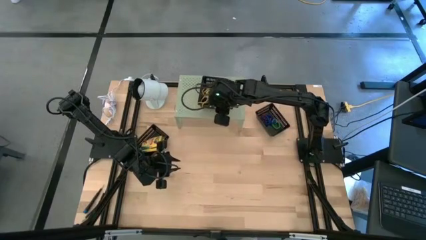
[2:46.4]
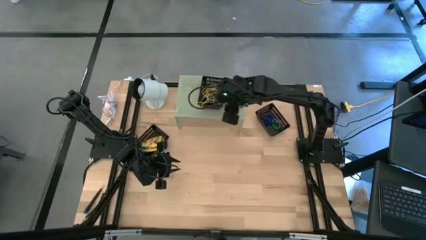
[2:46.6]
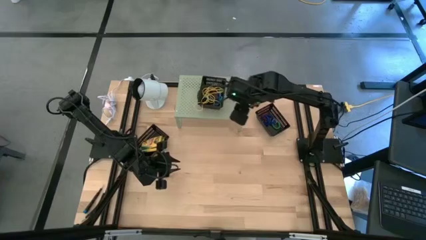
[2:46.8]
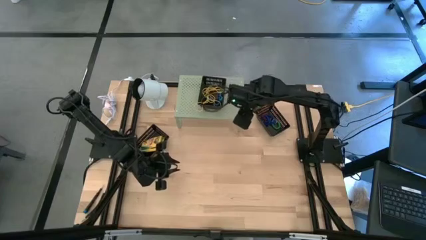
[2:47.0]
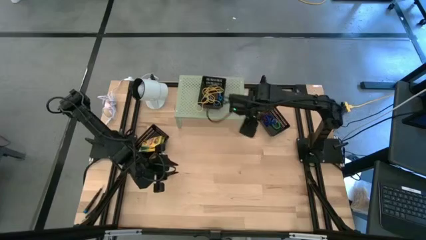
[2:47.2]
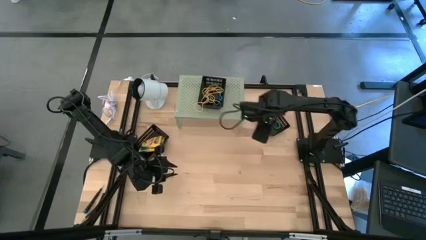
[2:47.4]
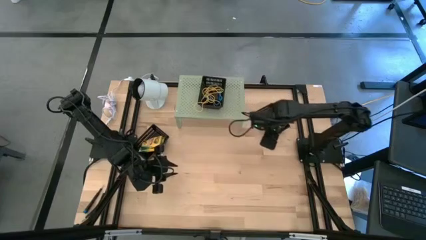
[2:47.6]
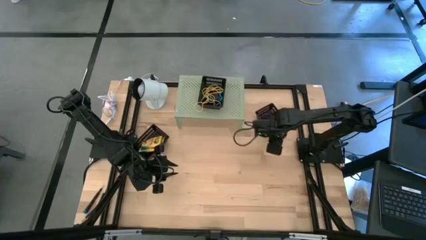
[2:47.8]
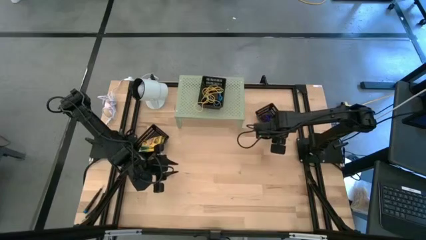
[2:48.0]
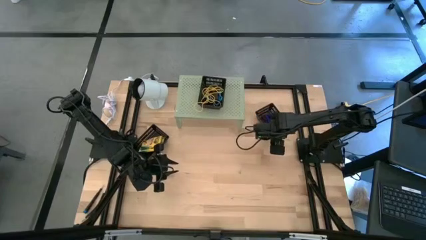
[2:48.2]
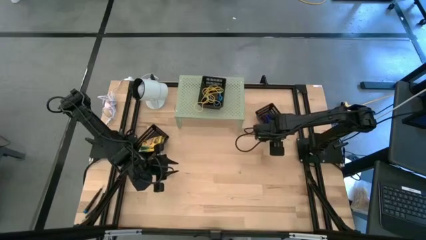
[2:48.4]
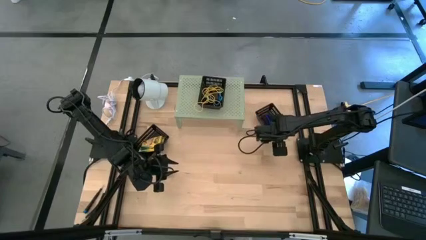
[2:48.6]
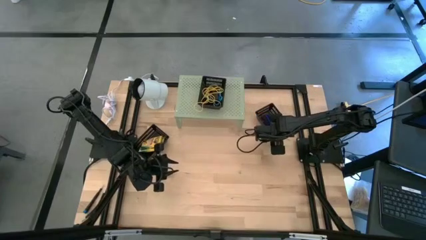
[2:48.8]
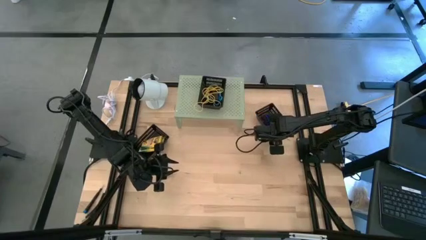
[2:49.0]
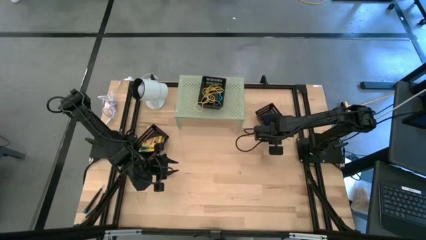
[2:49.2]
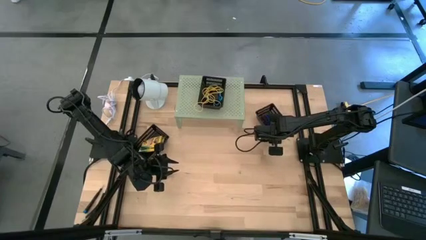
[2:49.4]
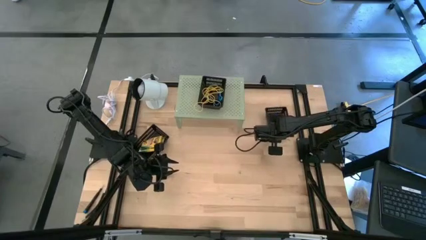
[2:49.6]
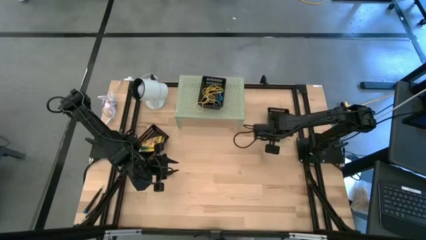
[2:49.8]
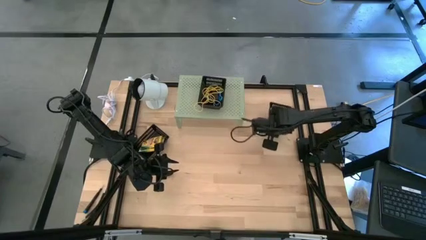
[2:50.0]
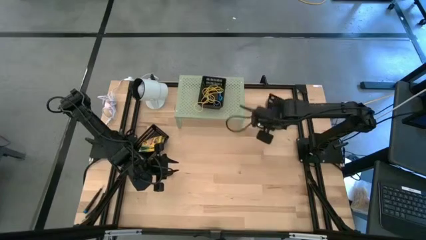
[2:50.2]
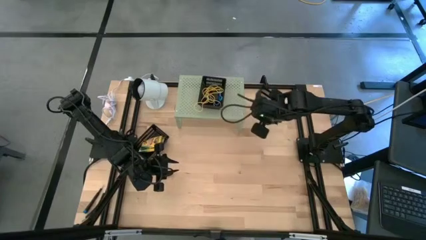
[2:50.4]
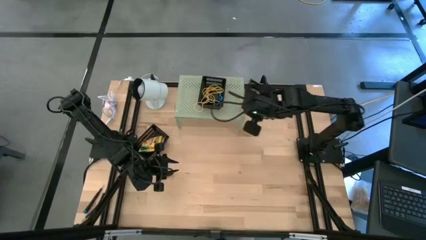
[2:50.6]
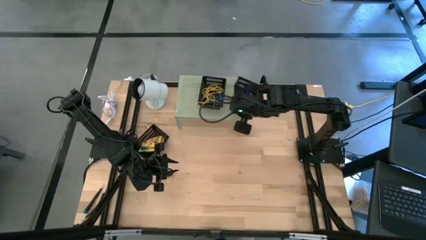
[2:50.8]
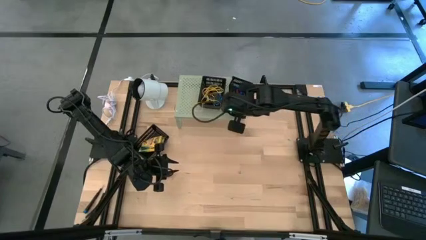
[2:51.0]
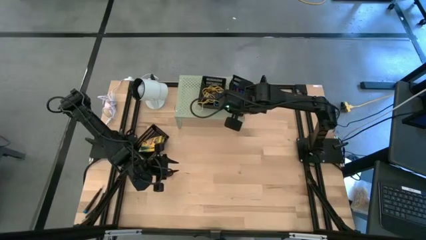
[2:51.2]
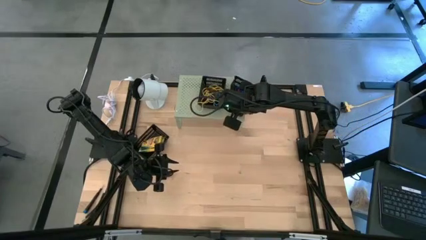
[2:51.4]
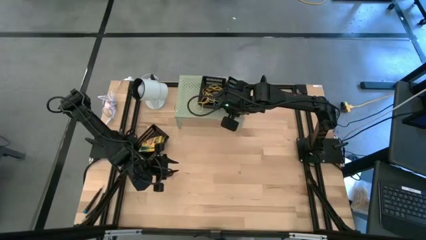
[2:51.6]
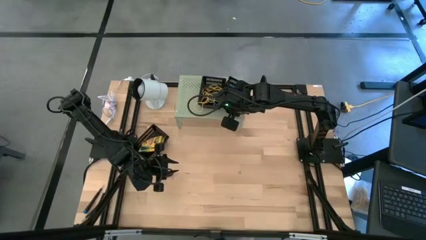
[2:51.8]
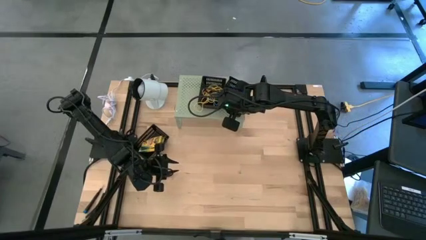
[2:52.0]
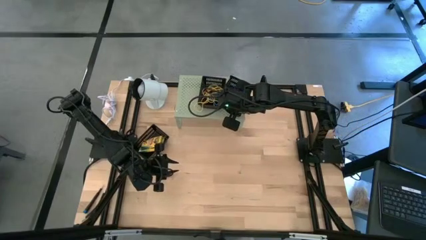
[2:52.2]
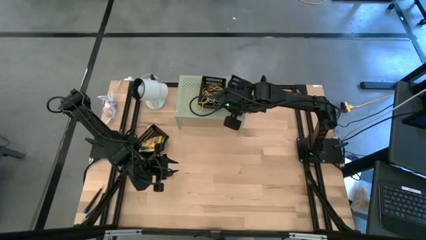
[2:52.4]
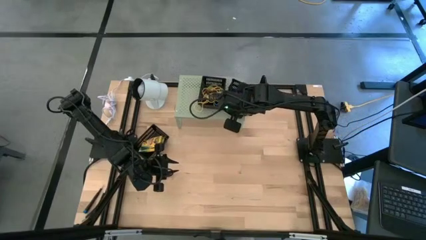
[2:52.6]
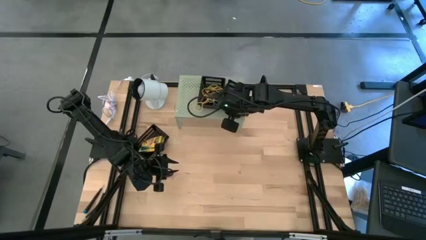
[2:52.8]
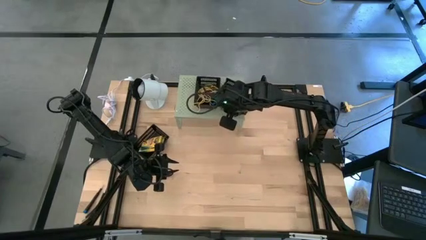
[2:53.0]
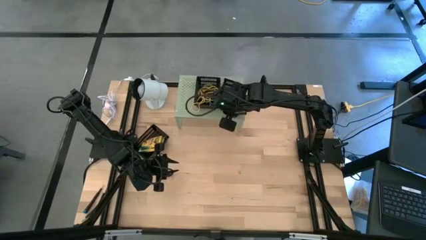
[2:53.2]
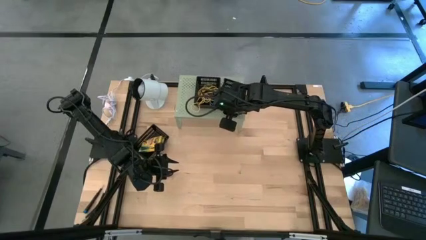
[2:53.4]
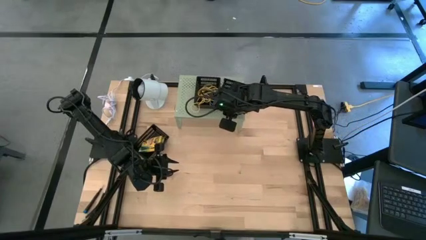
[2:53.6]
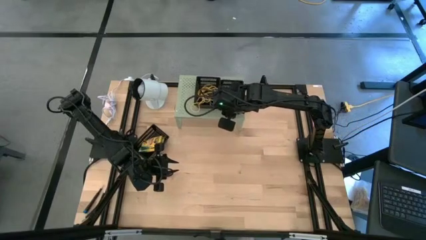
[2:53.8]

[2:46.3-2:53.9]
Task: Pick & Place Office Desk Supplies
Put the top black bin on the shelf

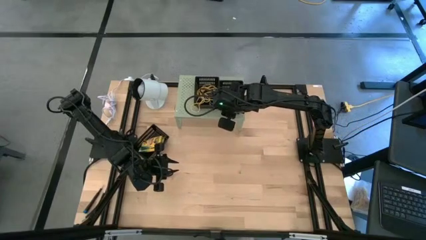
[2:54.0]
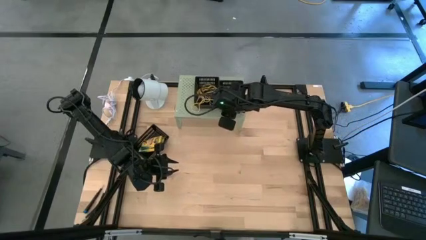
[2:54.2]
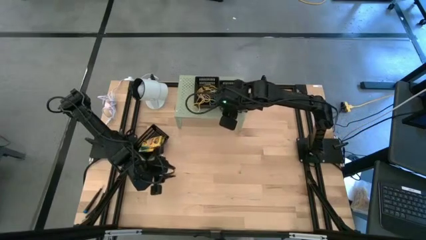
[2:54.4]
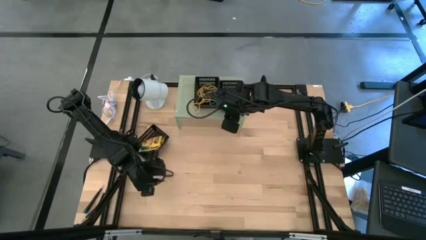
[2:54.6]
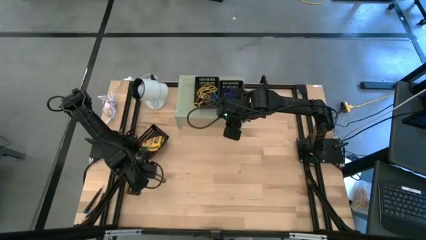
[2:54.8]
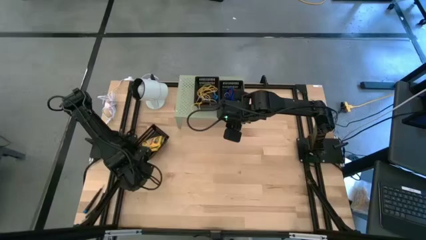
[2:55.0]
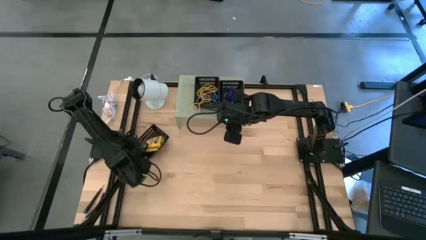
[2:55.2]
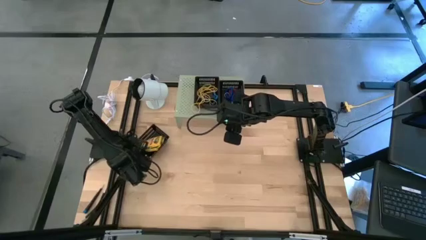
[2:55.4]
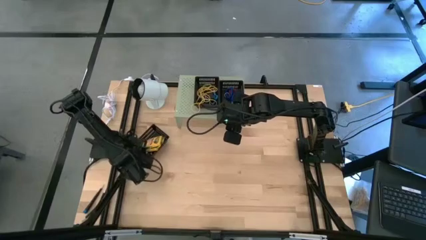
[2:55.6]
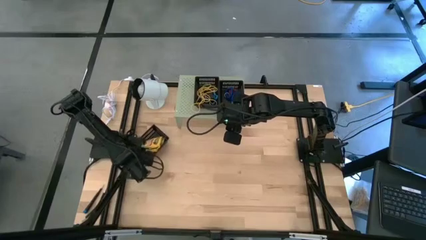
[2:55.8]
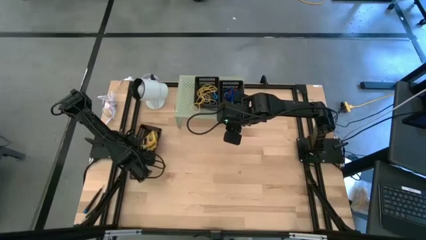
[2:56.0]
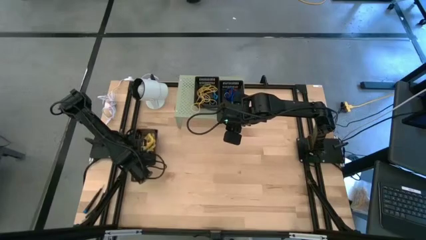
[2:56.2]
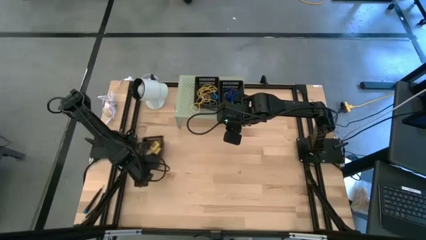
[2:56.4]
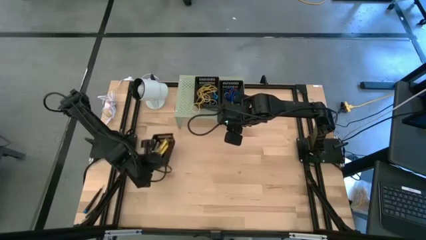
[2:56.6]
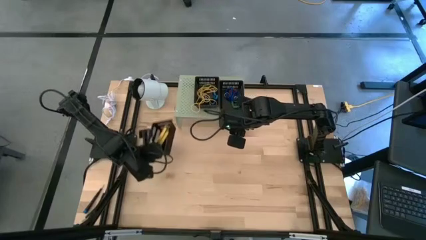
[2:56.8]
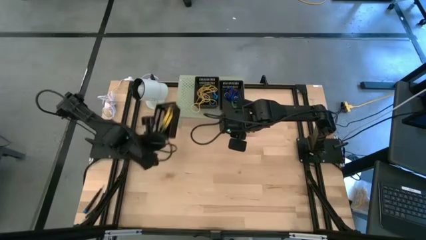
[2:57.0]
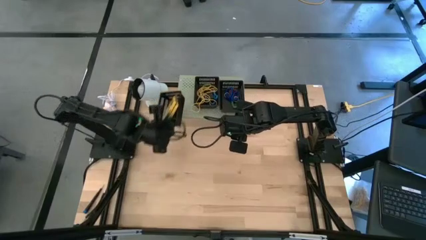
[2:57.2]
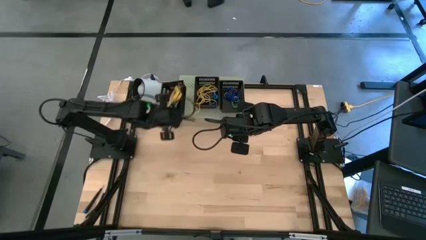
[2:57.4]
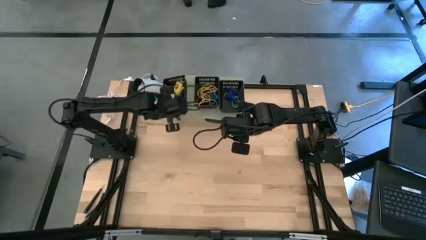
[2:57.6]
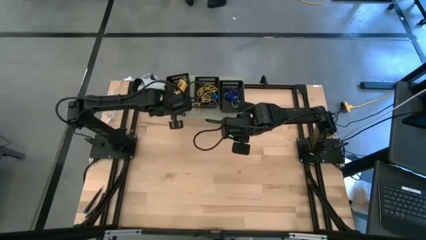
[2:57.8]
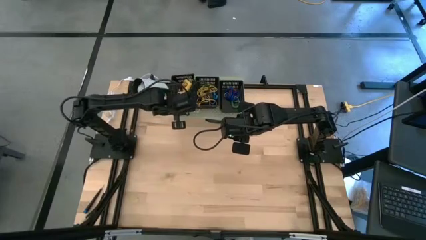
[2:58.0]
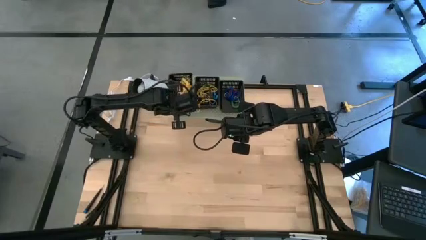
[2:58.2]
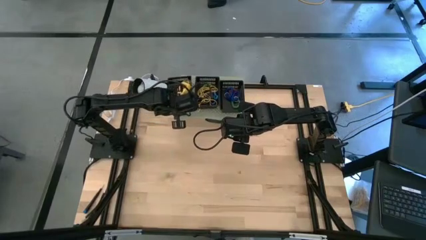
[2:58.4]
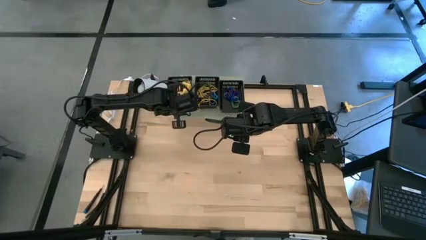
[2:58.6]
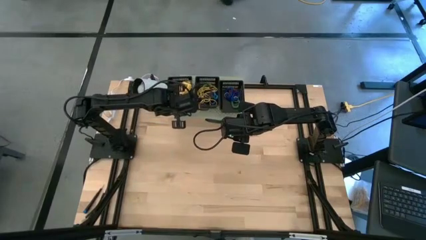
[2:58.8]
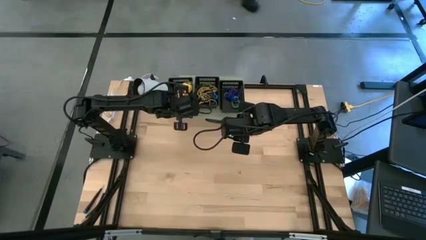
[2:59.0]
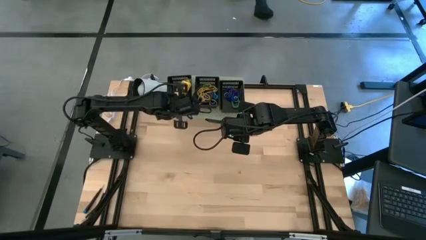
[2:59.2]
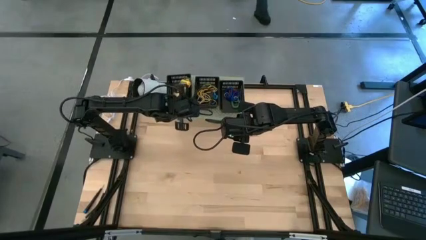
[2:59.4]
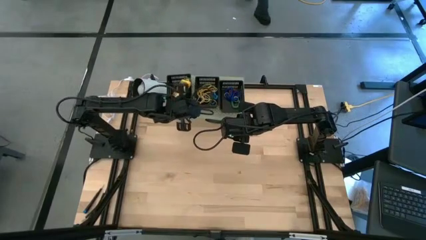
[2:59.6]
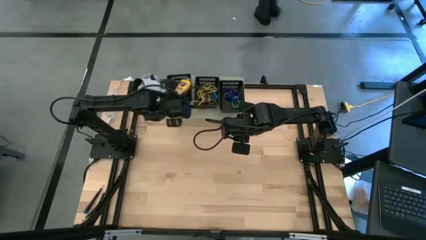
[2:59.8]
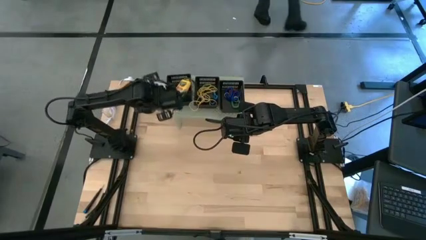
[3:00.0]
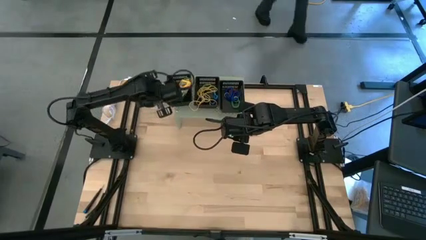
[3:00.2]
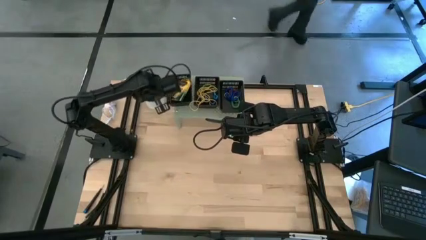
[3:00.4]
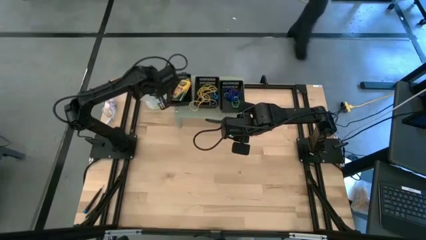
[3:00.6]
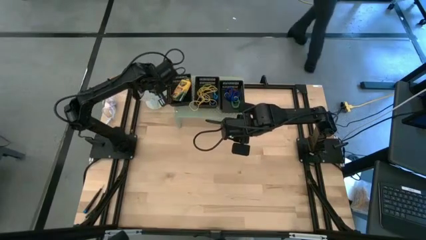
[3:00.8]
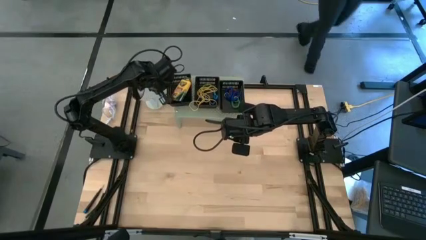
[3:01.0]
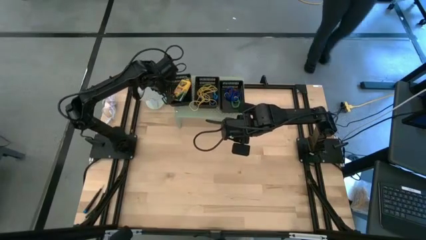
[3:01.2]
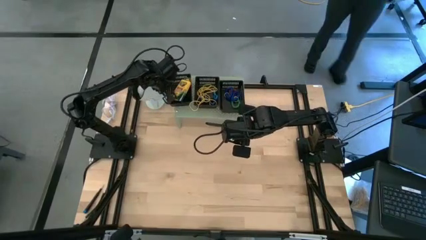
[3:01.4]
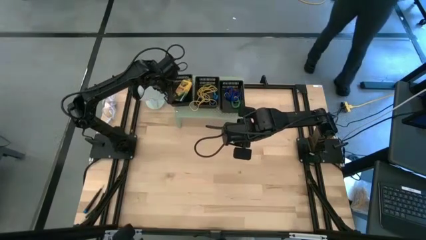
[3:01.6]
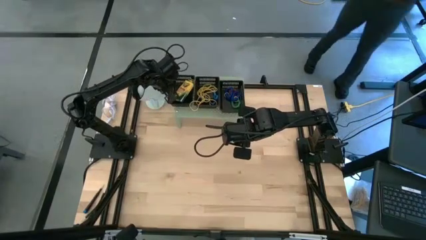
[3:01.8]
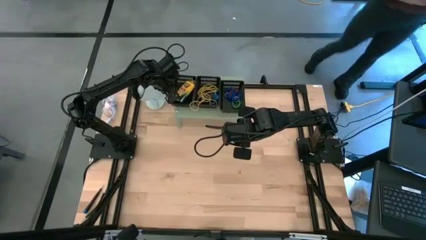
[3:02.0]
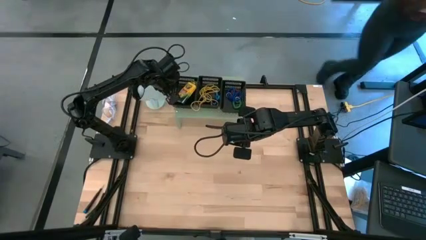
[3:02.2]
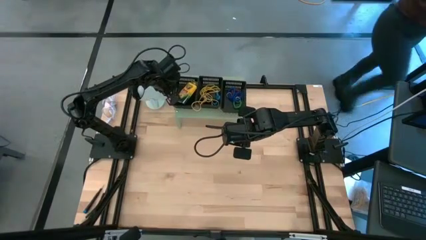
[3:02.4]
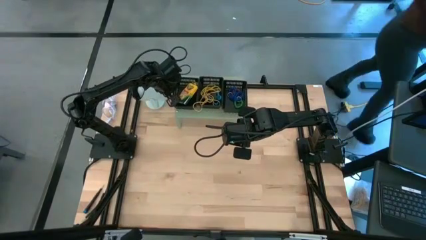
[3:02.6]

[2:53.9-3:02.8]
Put the black bin on the shelf
